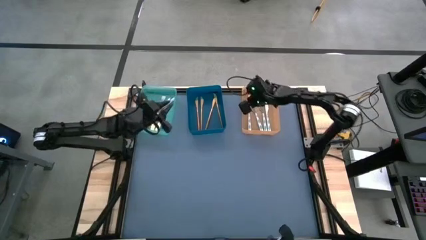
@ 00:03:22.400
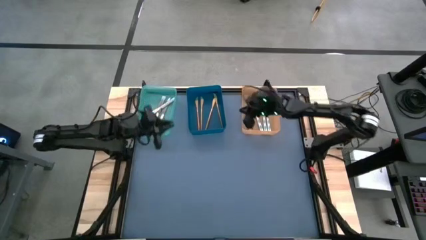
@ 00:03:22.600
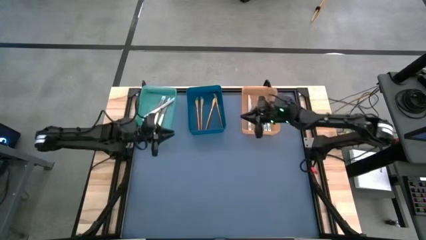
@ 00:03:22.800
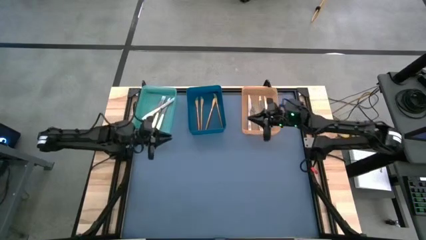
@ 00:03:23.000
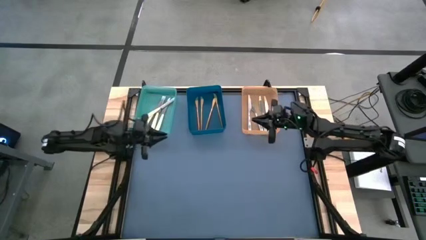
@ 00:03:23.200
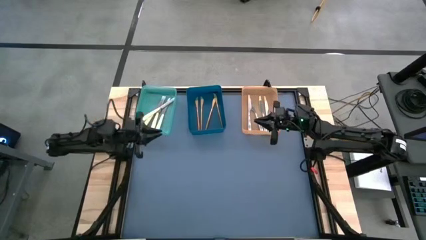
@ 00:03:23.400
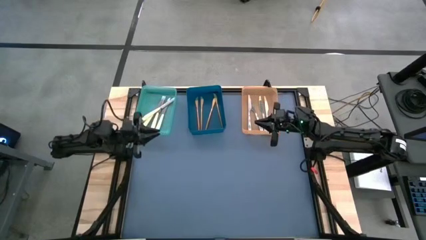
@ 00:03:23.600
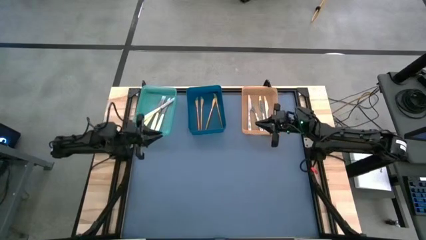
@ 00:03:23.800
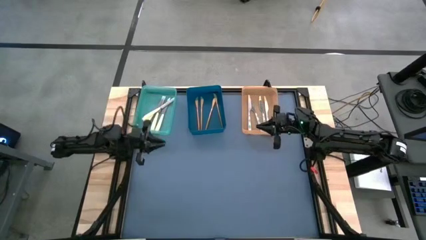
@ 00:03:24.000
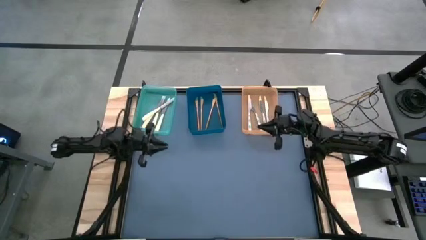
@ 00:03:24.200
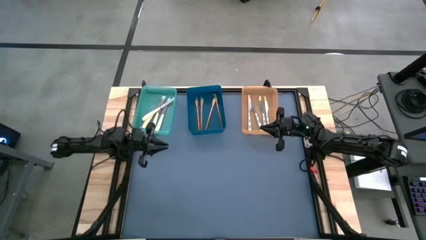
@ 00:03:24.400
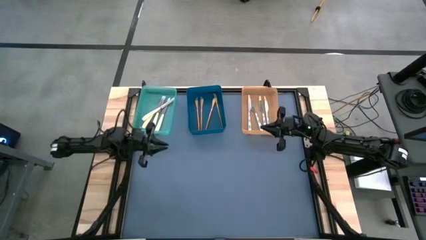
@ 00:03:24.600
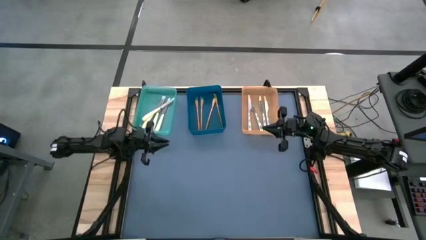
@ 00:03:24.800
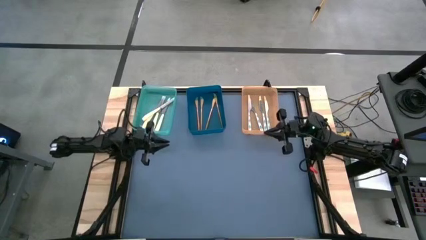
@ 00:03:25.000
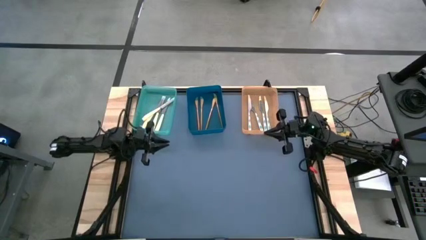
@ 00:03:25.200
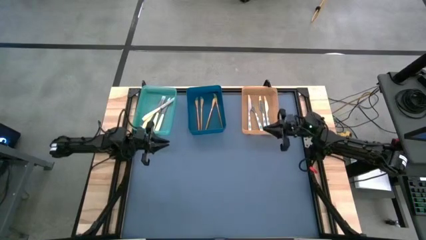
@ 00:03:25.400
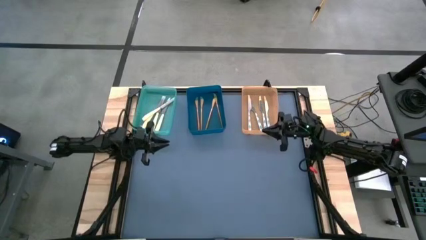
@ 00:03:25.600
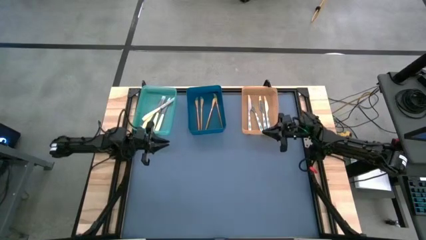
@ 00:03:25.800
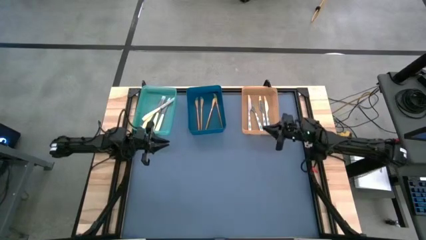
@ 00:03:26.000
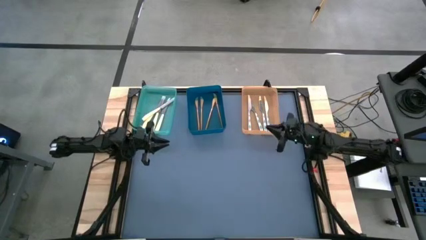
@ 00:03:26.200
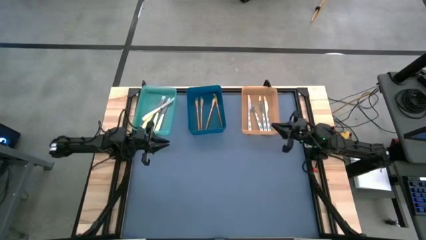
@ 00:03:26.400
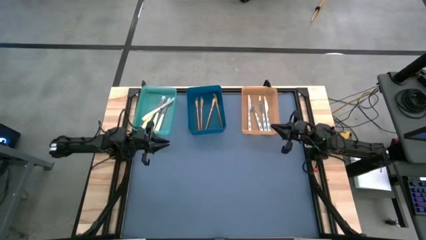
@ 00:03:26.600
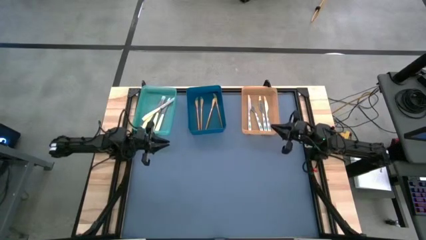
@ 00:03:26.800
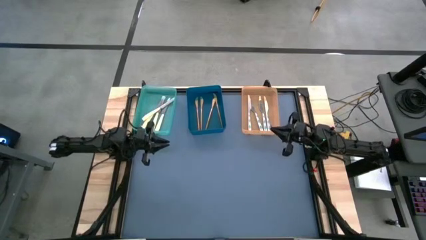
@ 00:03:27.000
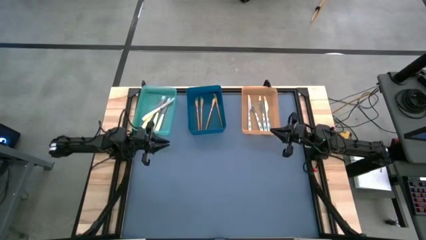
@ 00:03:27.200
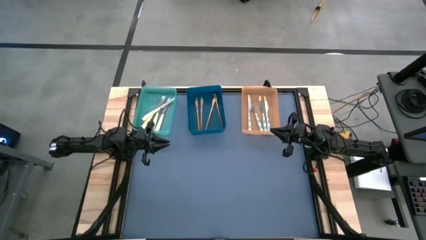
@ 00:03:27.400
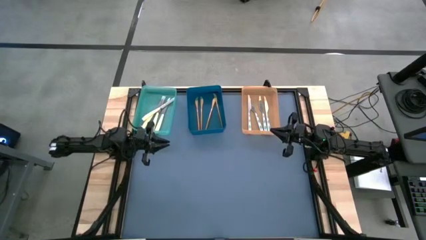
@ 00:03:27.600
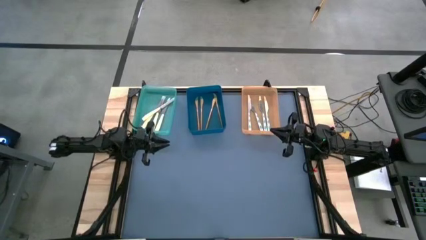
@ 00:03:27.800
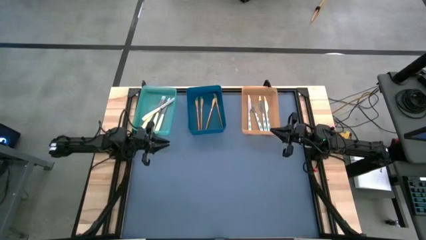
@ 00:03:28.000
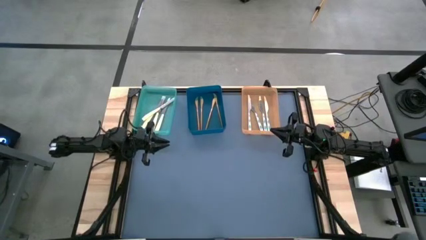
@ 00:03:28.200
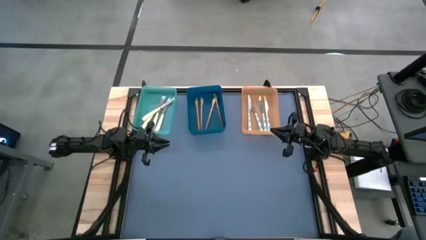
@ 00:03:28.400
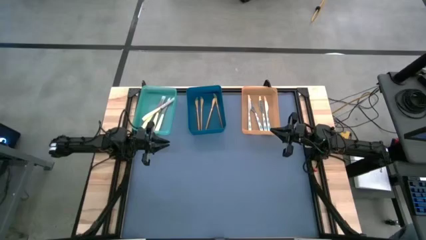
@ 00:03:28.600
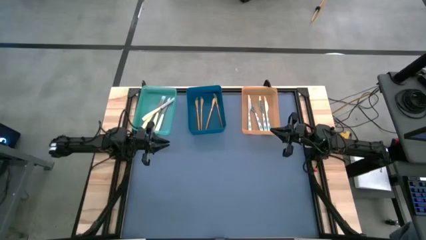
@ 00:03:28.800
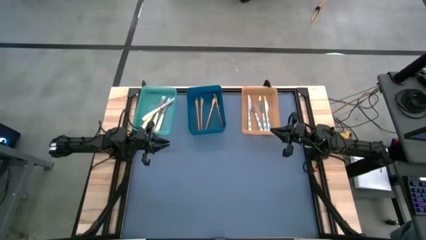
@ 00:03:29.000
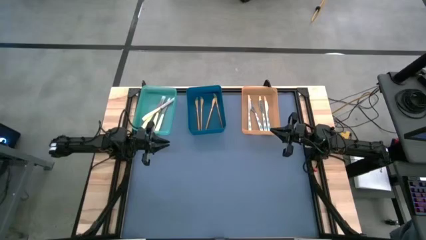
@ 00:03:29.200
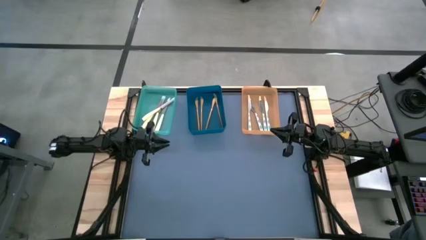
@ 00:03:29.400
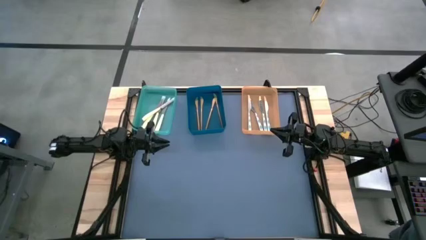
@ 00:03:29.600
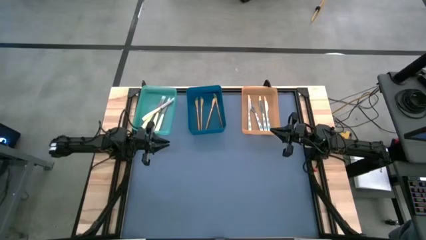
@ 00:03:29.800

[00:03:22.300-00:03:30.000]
Task: Sort silverware by color (type)
Return to Home Position

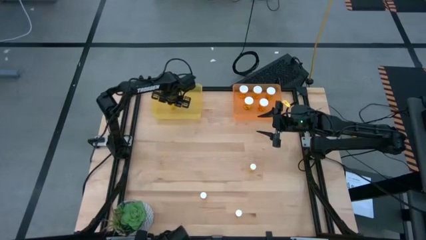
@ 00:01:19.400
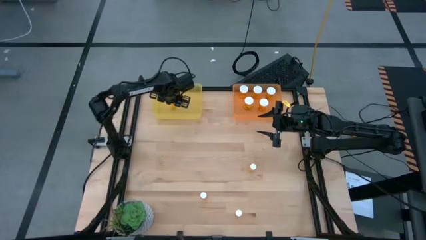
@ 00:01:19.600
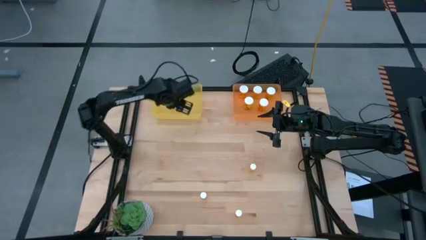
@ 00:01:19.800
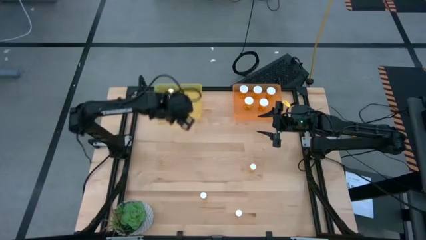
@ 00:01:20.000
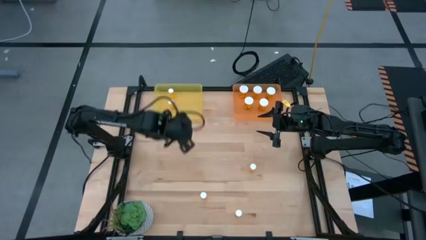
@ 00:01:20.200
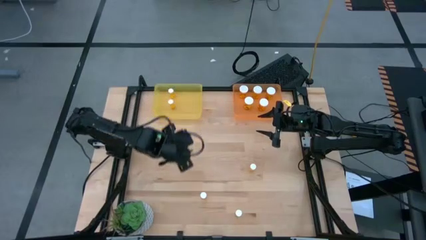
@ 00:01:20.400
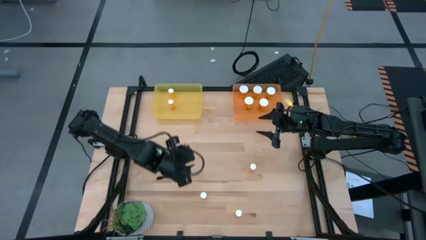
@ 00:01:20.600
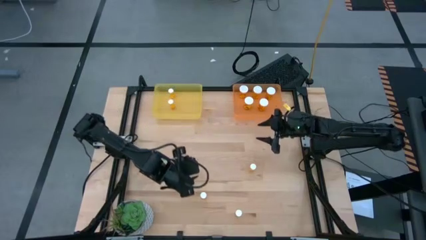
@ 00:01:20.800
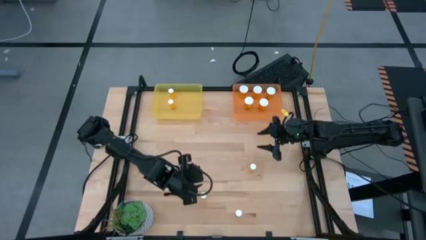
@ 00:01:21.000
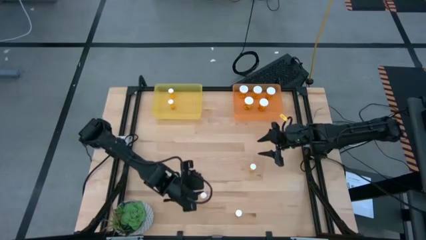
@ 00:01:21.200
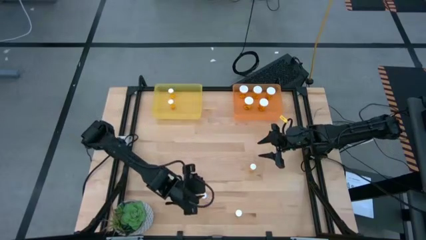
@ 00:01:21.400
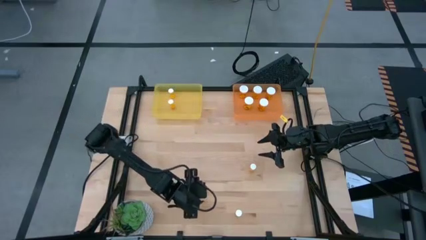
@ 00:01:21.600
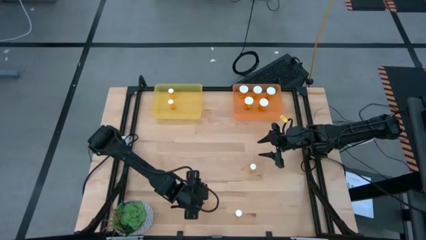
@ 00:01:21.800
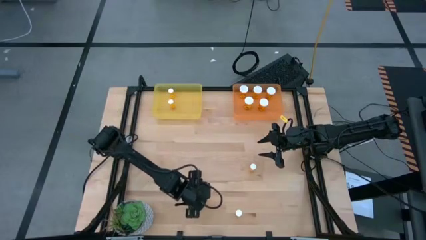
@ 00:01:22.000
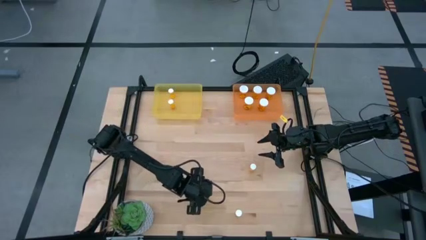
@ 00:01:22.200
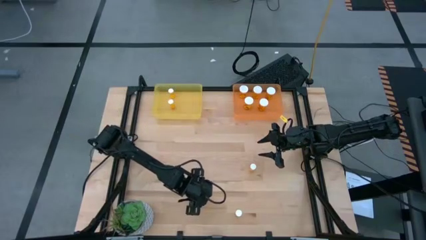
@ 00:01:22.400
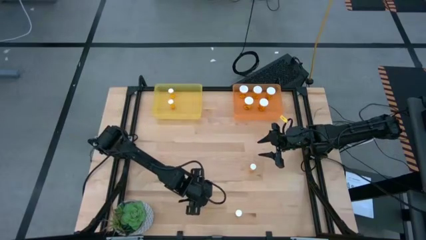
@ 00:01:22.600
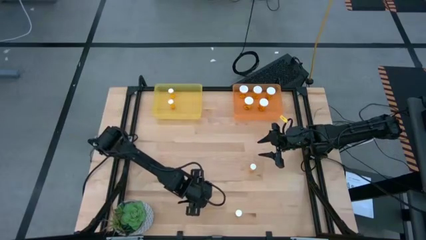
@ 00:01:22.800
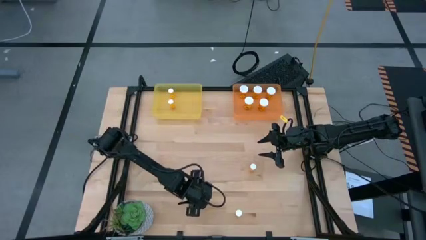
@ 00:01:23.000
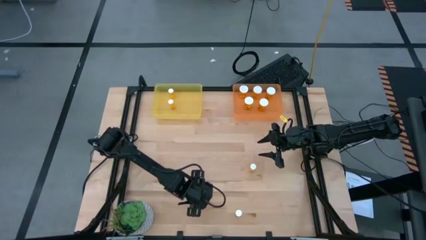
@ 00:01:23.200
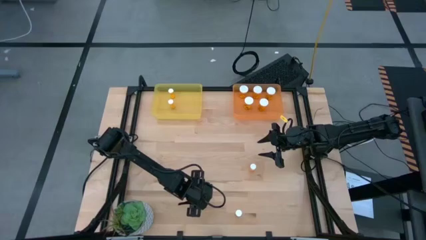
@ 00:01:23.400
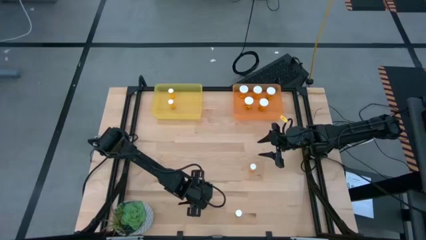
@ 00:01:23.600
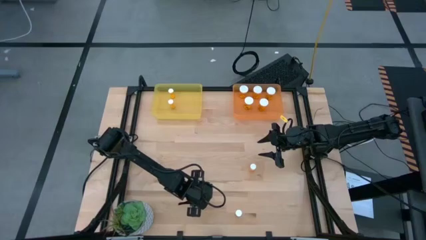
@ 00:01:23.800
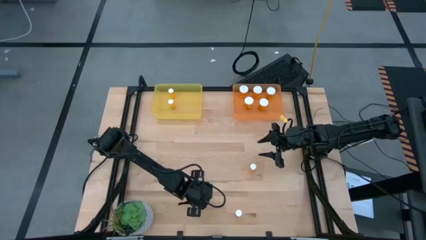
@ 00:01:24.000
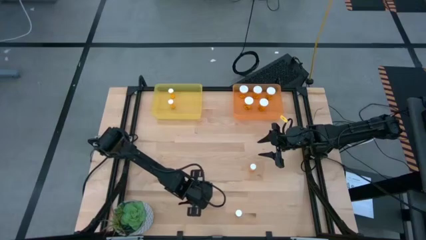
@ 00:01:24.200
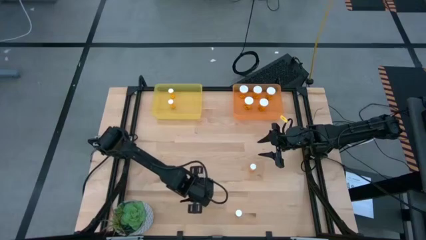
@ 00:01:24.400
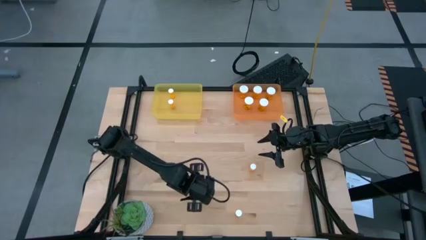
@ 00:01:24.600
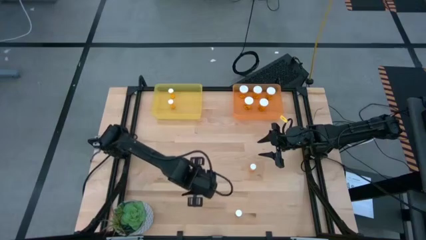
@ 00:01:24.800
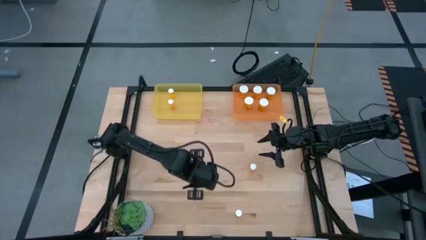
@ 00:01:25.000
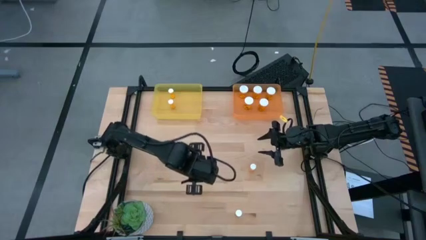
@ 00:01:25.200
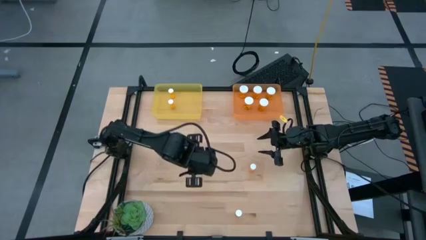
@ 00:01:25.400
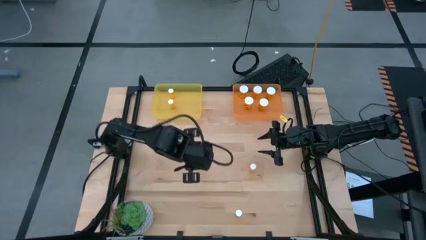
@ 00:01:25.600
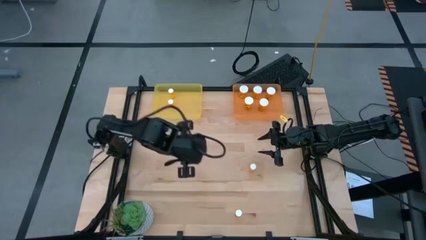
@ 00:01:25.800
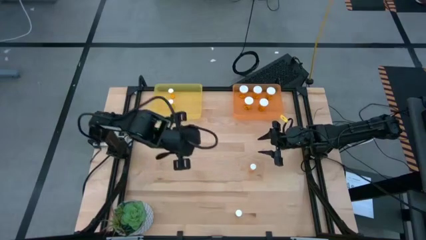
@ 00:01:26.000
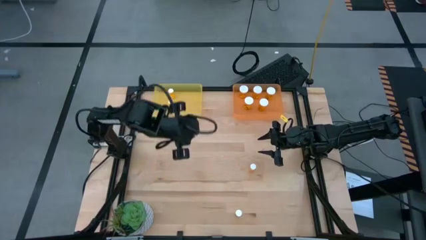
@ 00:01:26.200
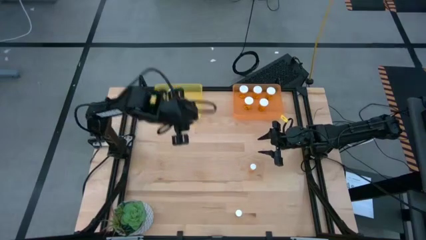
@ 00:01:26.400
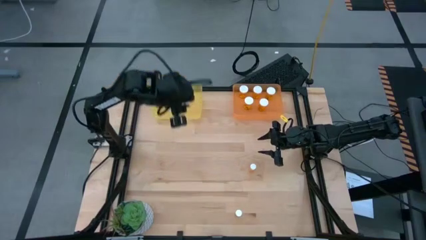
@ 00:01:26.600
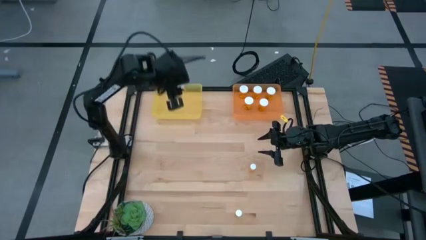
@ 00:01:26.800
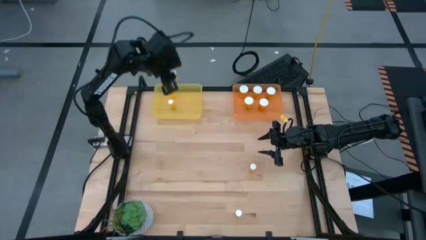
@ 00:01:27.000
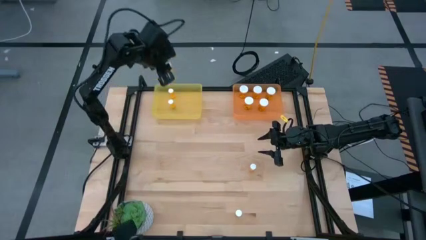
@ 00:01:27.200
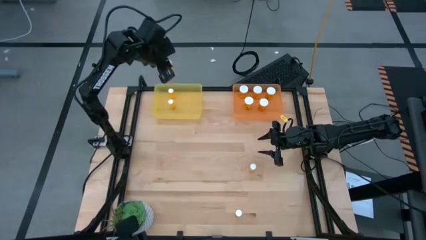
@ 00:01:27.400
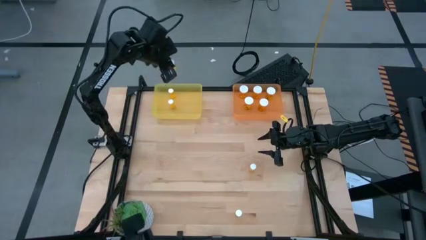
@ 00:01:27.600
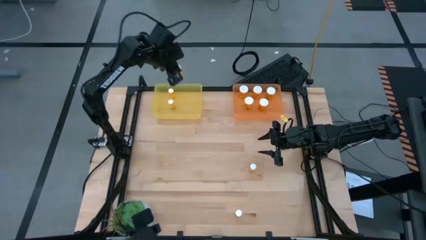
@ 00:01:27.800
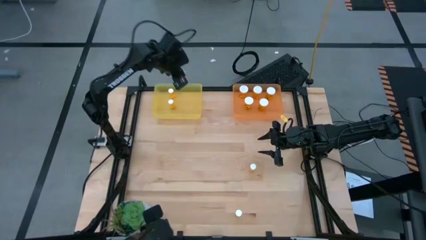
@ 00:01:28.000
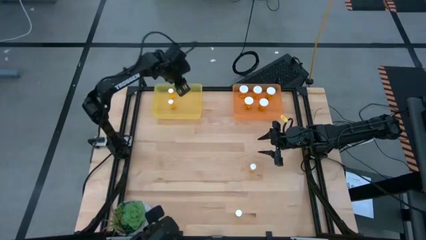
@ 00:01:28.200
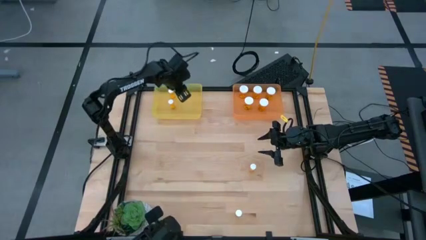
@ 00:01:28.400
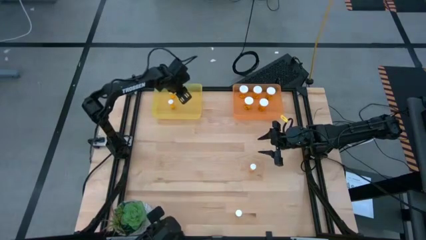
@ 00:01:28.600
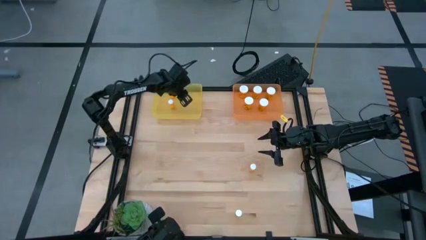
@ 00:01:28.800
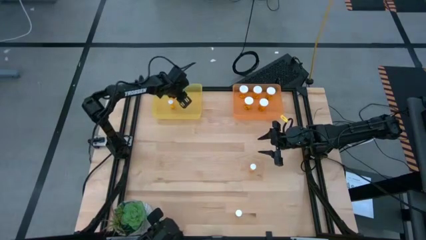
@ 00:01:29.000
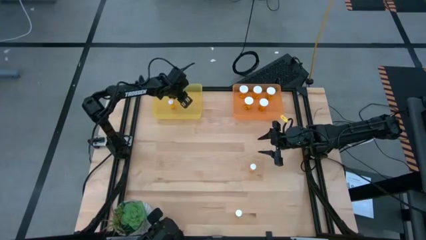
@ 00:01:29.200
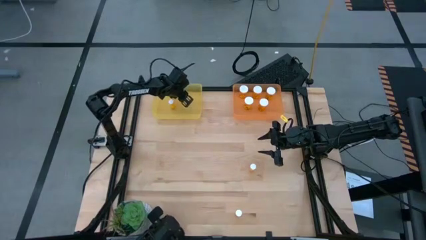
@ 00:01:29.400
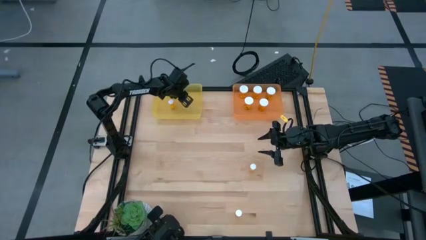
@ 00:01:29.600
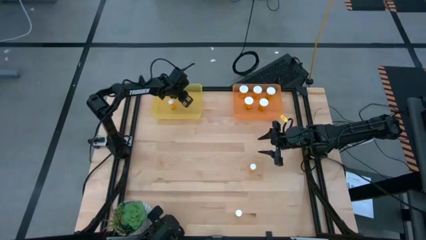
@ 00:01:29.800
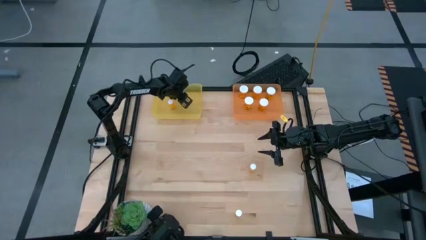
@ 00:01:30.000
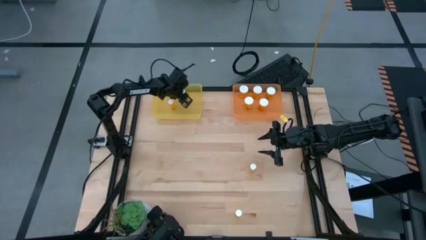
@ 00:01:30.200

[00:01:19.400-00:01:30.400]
Task: Pick and place medicine bottles into bin by pill shape (circle, oval)
Put the small yellow pill bottle into the transparent yellow bin
